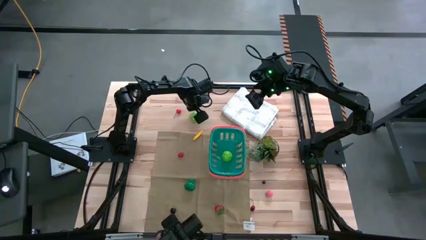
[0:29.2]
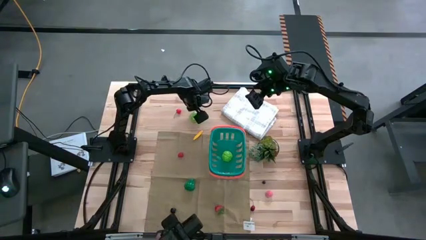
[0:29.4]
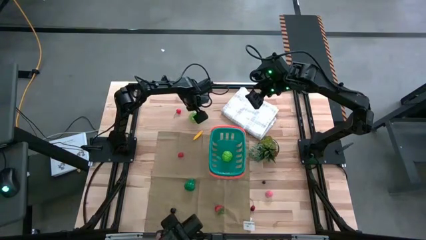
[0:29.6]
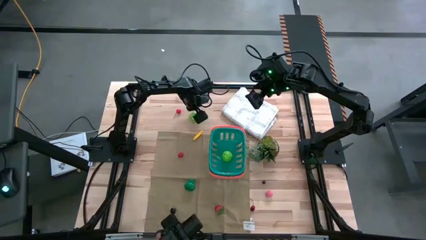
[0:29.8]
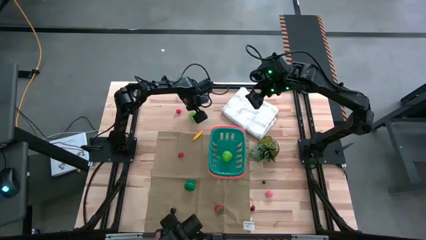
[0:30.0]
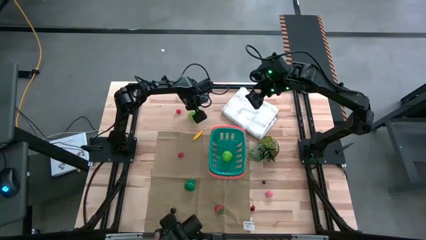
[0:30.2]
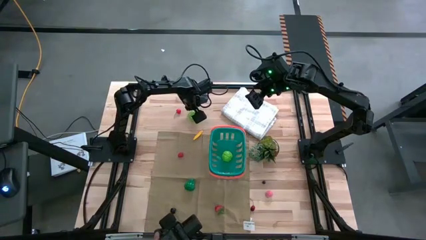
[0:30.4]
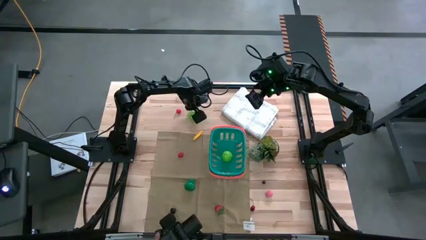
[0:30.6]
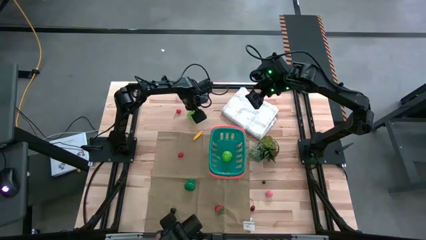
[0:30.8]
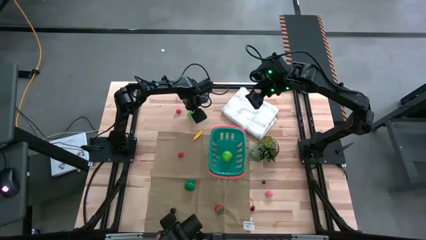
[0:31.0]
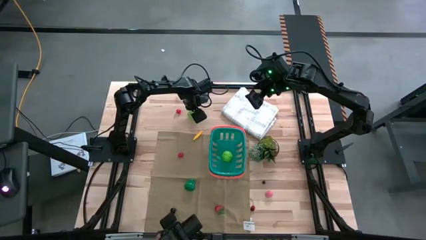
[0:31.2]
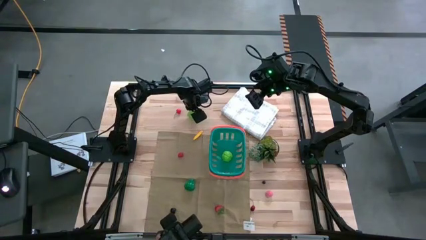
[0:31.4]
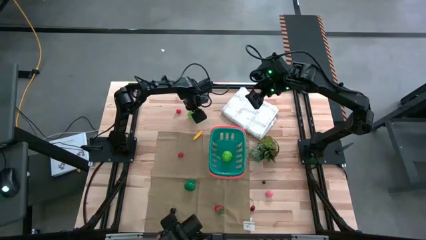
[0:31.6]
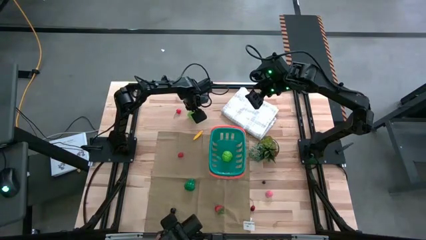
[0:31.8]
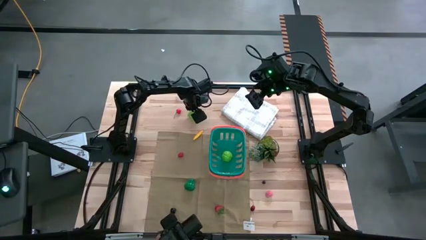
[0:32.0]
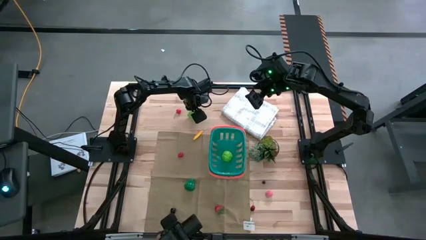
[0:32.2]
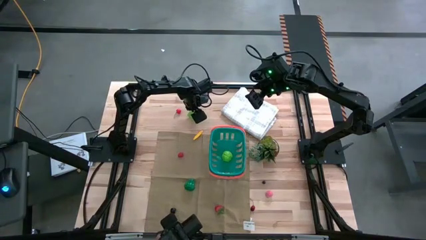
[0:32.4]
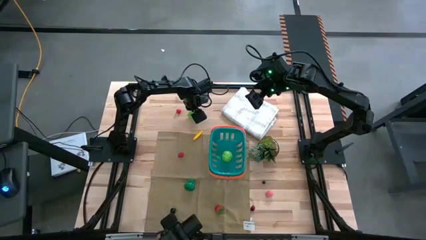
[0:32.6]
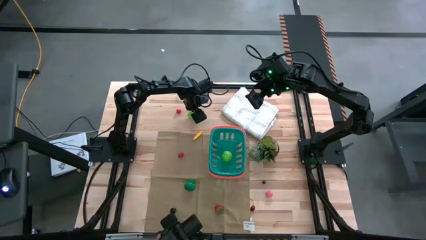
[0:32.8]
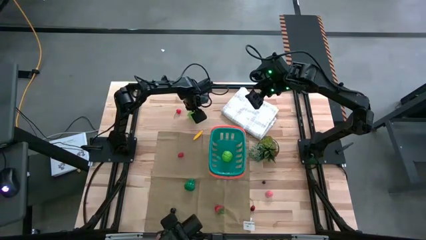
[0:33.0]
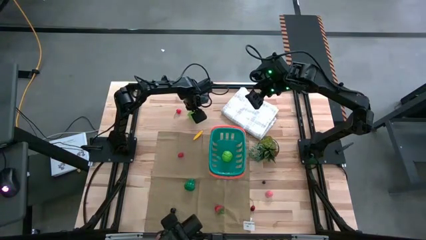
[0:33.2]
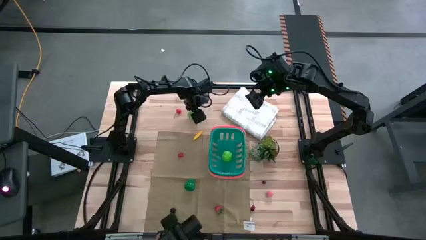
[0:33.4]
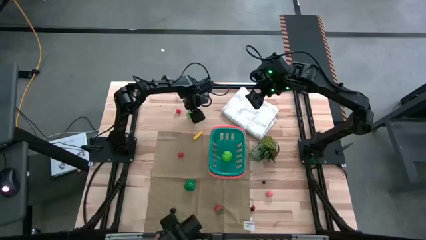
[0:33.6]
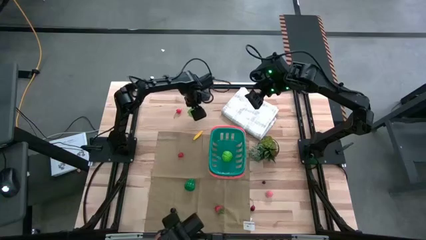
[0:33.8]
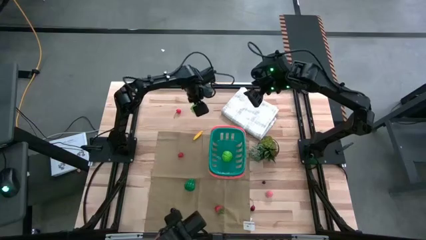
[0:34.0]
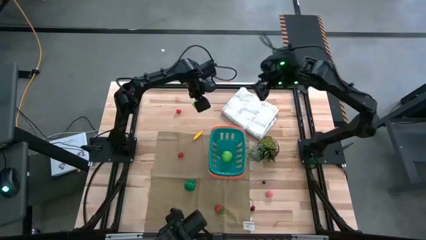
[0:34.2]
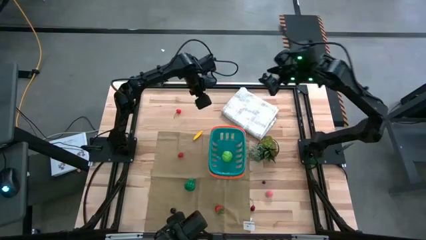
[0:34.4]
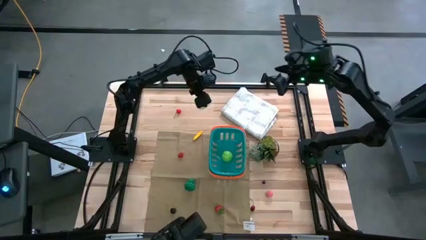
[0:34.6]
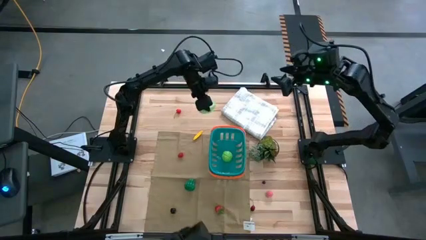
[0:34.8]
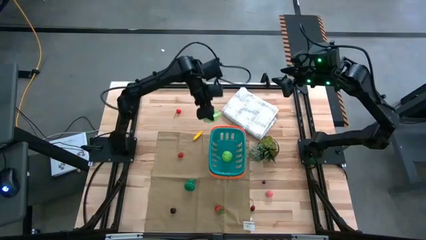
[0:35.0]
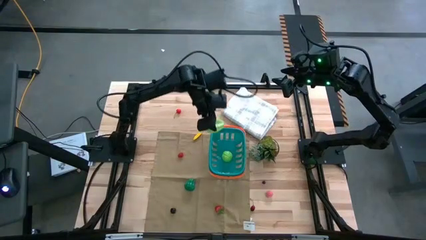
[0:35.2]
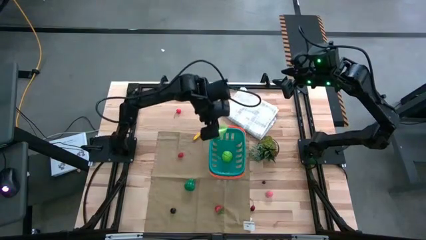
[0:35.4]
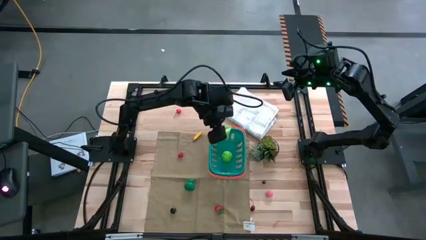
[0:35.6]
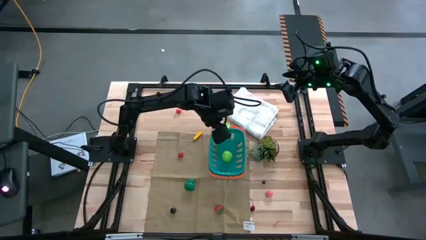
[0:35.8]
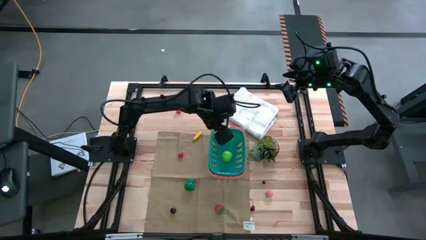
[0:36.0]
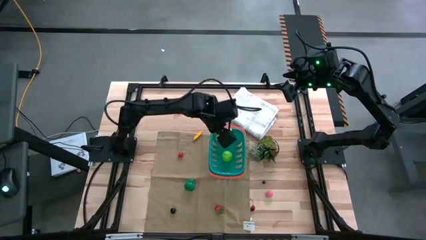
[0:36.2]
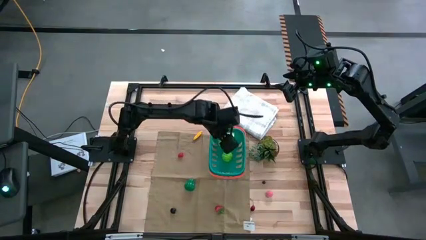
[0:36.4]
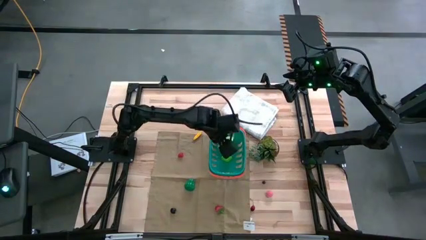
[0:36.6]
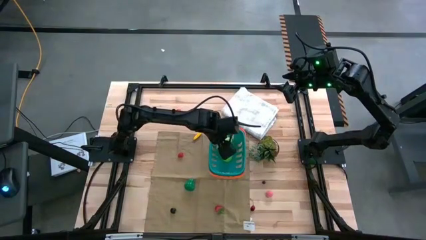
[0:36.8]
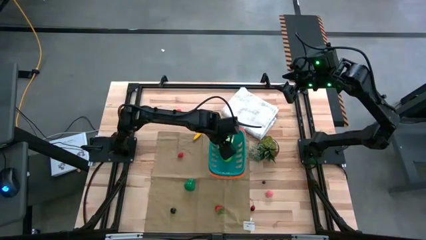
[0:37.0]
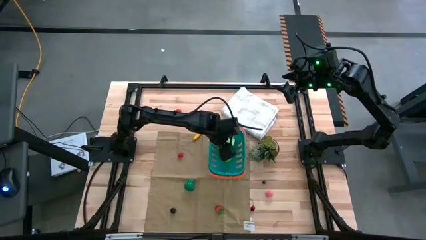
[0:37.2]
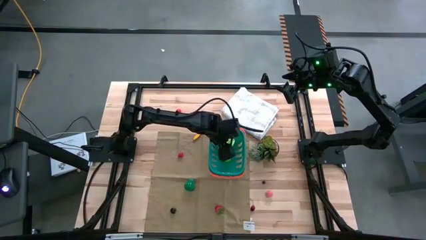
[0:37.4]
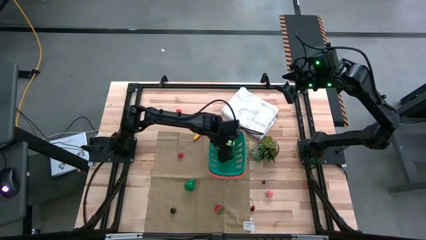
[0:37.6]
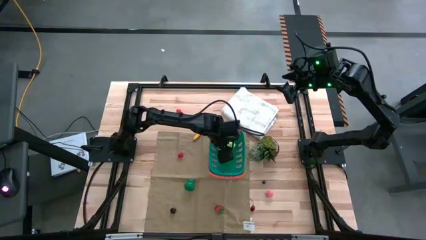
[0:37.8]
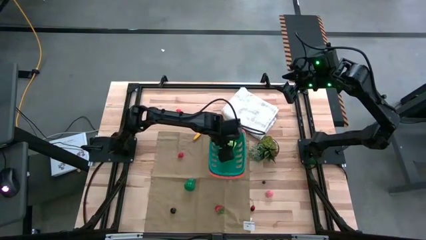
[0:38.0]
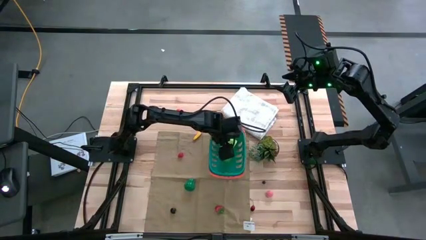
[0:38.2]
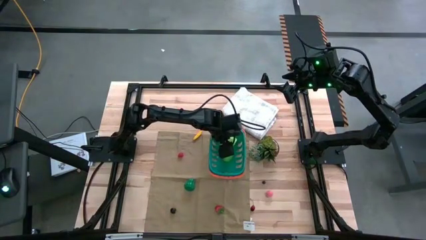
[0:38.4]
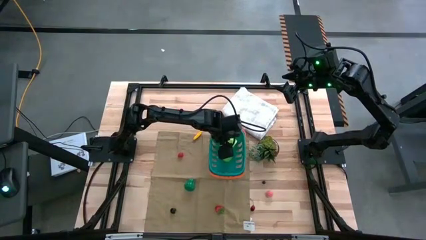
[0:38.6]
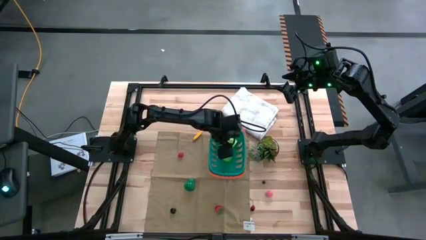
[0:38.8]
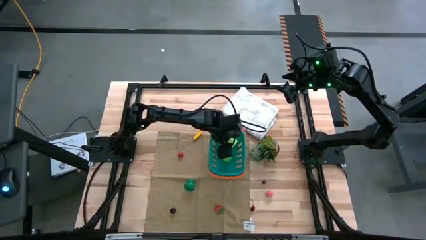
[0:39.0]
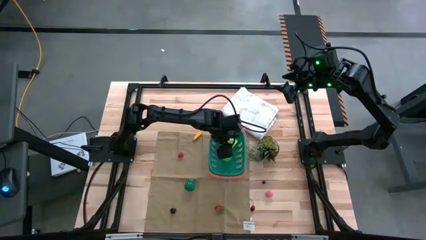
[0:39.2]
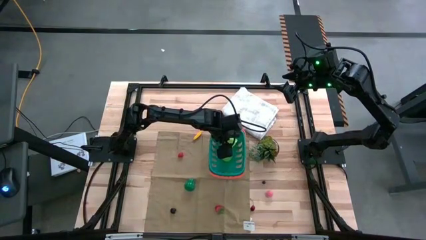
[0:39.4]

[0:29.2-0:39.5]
Task: Pick and placing Produce into tupperware
Put the green starfruit into the blue basket
